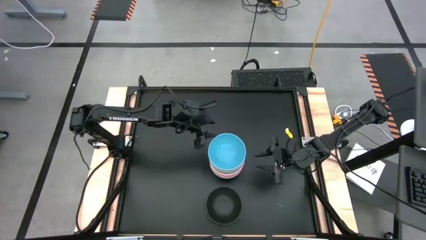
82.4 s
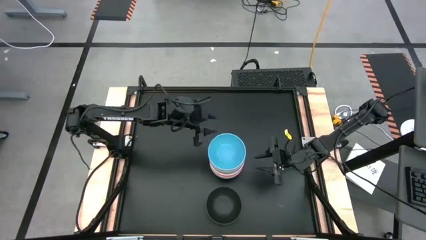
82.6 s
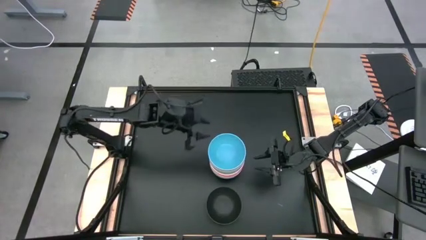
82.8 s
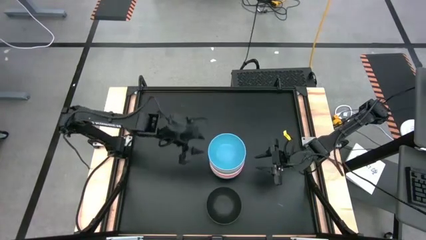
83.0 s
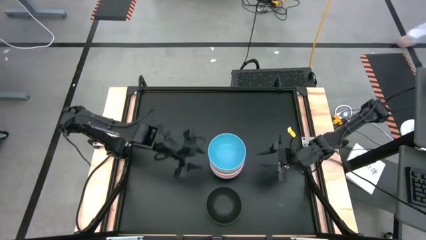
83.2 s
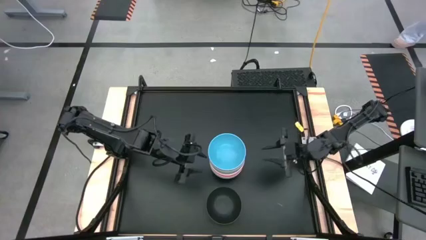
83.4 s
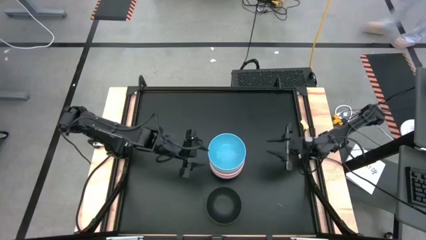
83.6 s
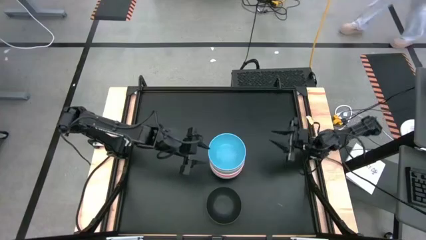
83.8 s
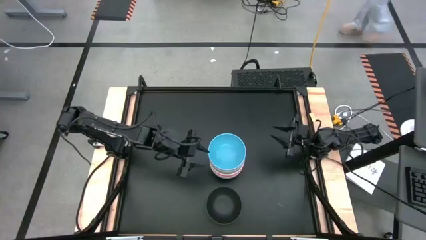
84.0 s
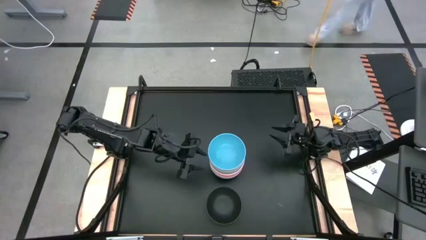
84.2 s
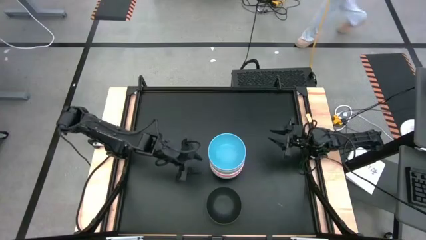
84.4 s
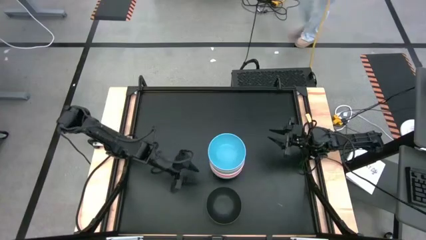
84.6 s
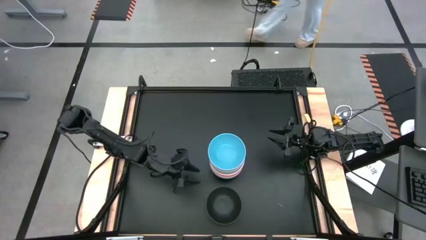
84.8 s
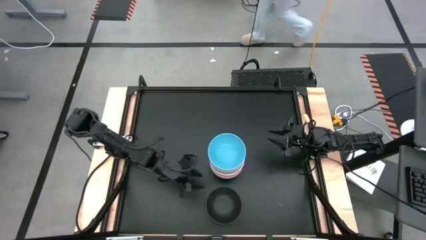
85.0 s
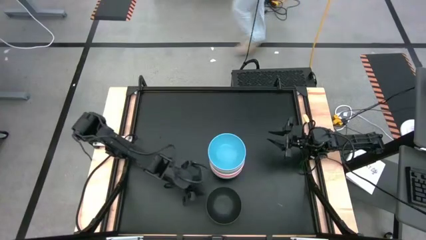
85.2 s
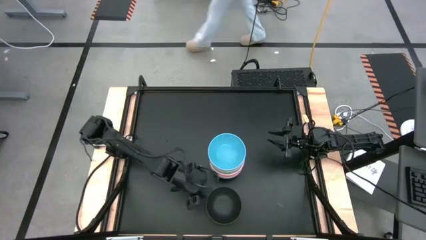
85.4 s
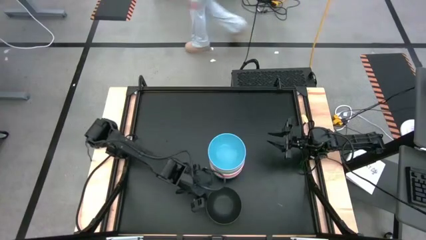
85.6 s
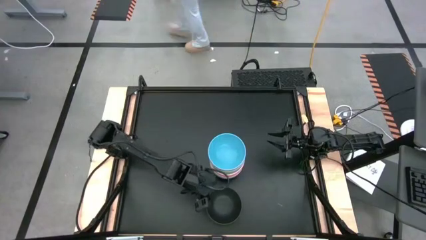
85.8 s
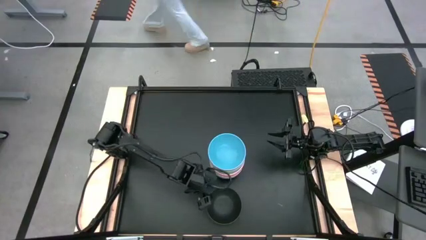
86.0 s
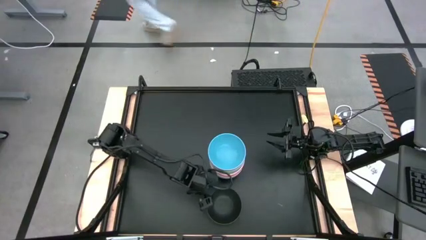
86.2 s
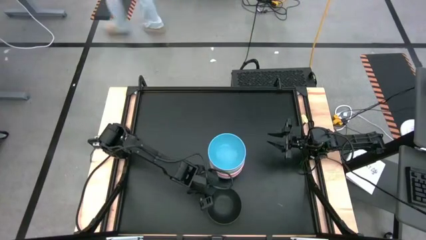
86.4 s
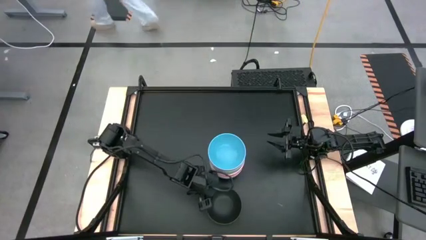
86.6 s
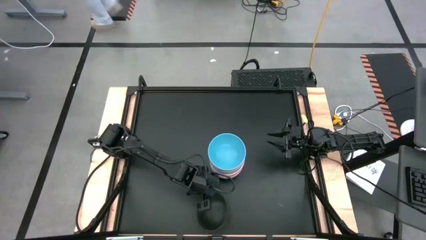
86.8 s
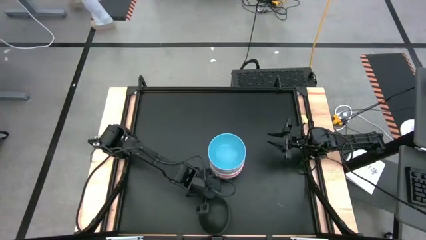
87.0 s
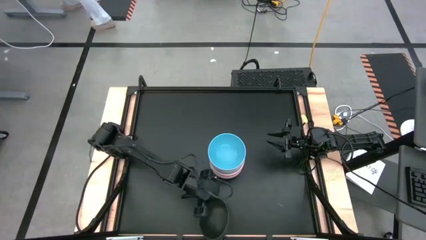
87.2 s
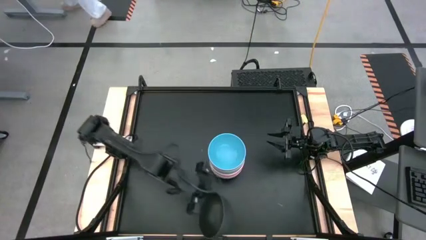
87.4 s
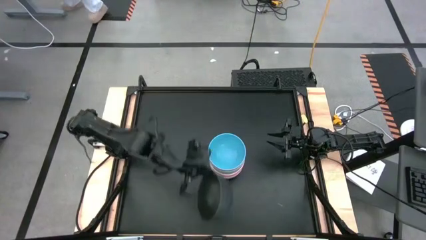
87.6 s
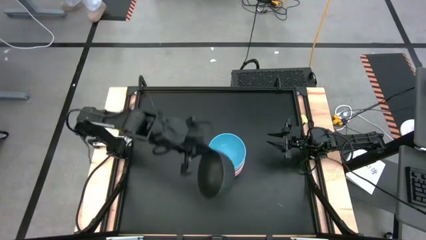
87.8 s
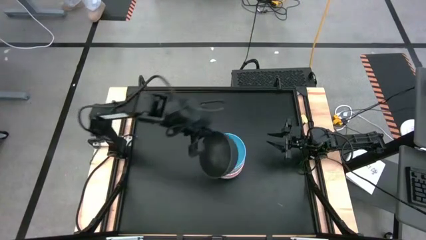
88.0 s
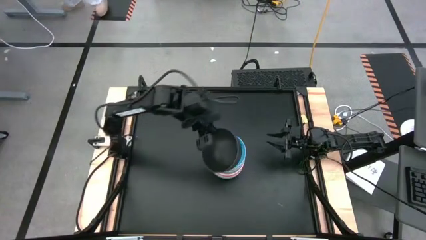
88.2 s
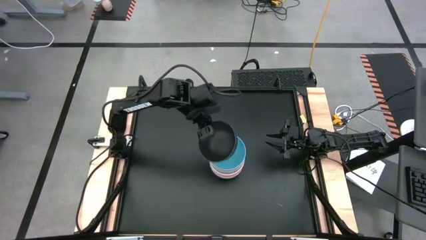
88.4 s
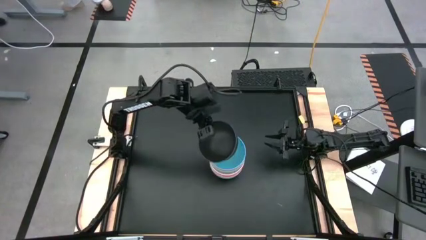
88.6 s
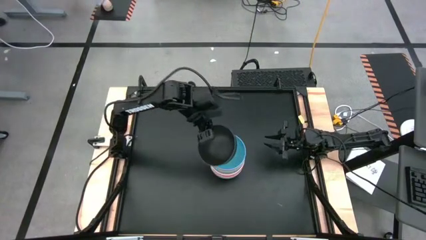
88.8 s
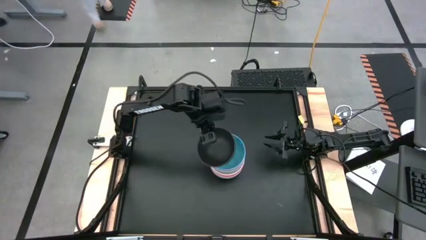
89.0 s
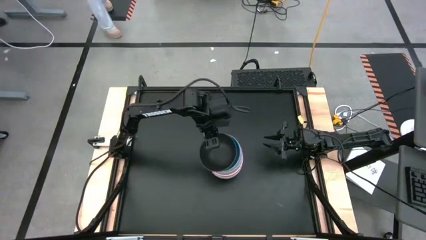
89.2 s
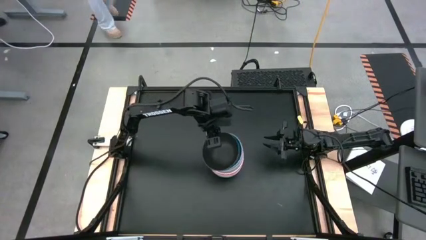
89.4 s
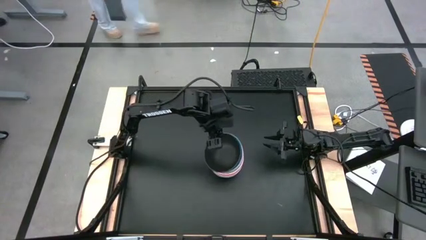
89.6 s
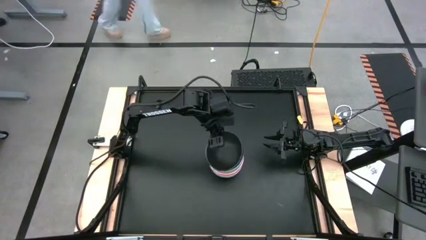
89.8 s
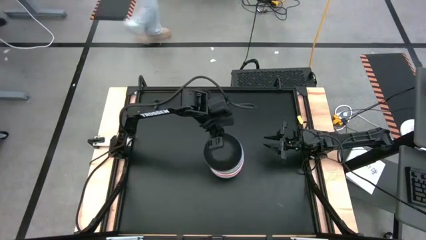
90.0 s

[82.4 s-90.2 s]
Task: Nest bowls inside each other
Stack the black bowl on top of the blue bowl

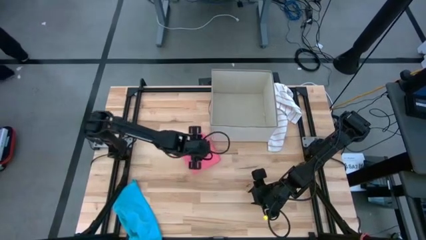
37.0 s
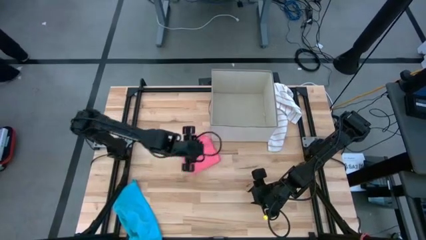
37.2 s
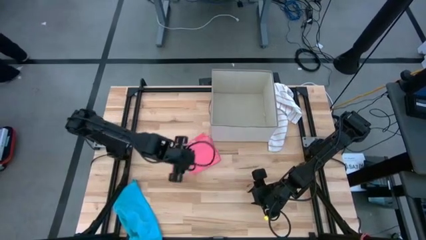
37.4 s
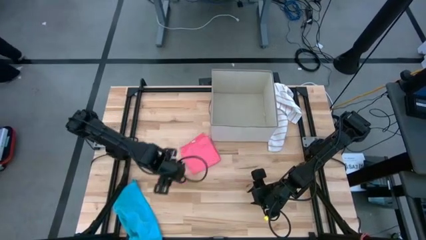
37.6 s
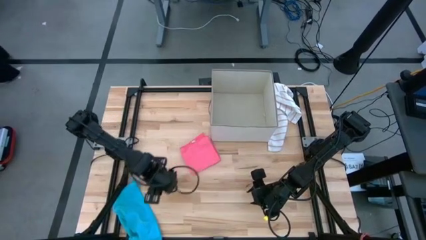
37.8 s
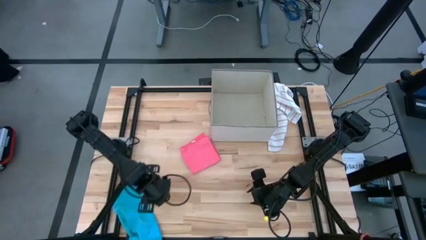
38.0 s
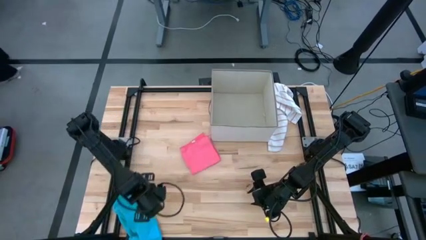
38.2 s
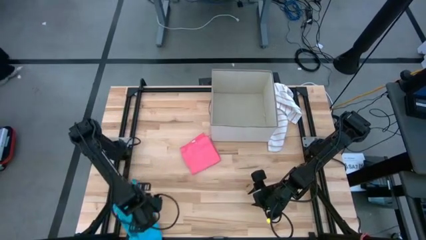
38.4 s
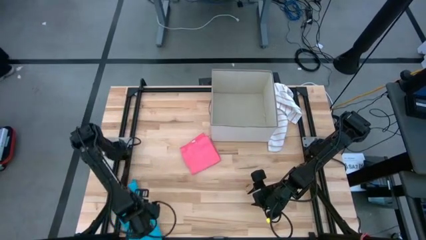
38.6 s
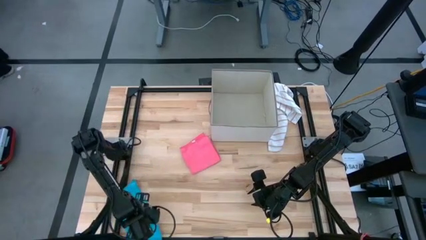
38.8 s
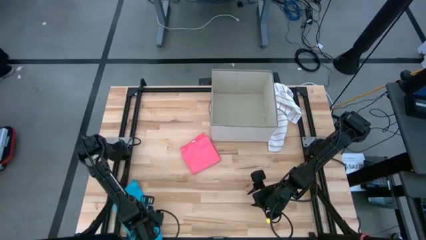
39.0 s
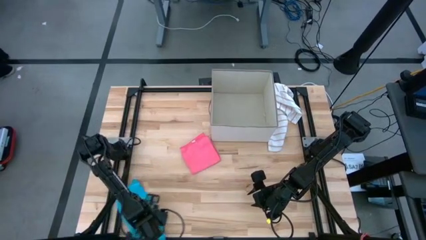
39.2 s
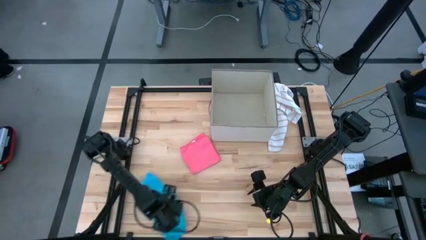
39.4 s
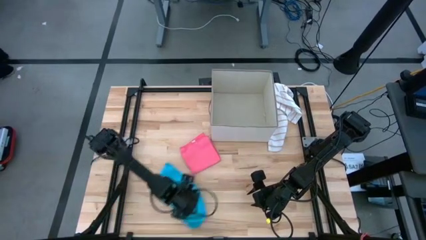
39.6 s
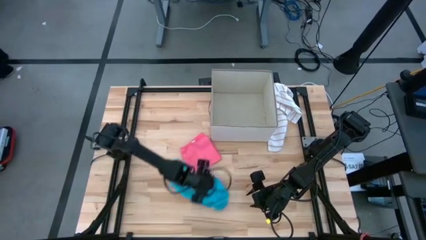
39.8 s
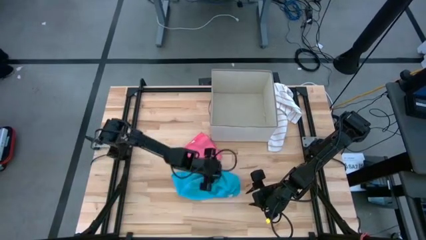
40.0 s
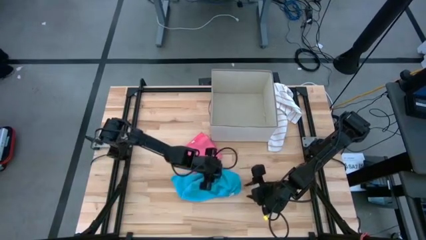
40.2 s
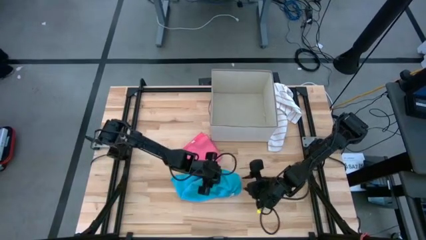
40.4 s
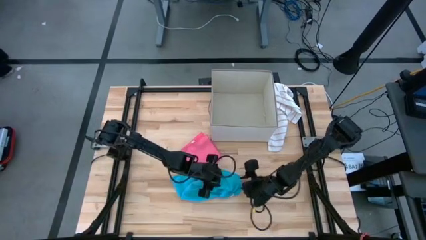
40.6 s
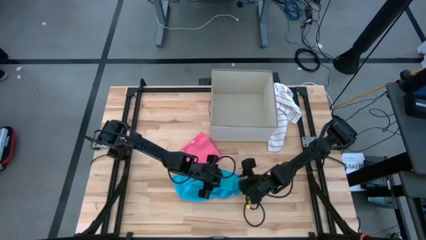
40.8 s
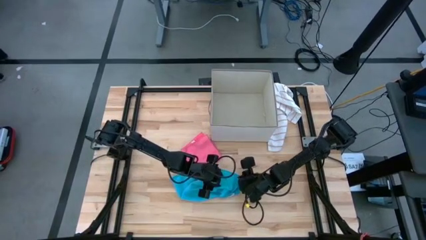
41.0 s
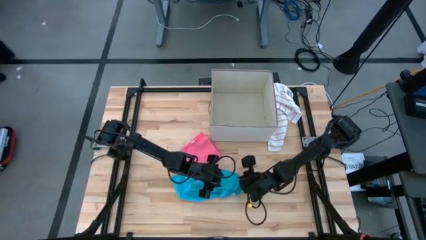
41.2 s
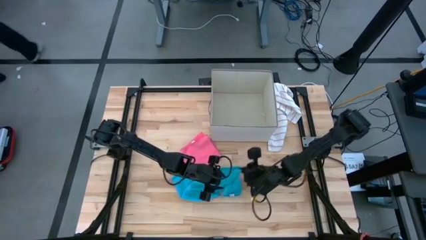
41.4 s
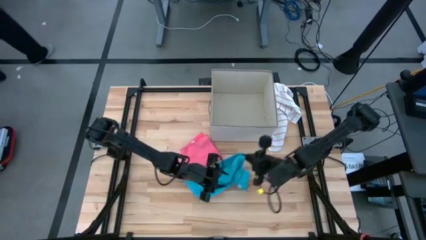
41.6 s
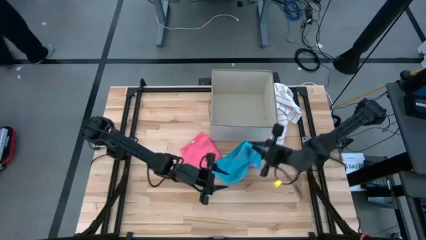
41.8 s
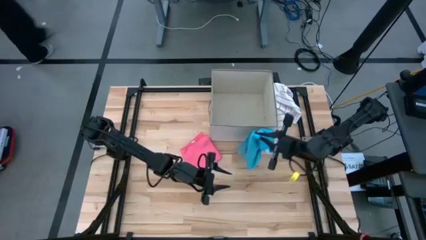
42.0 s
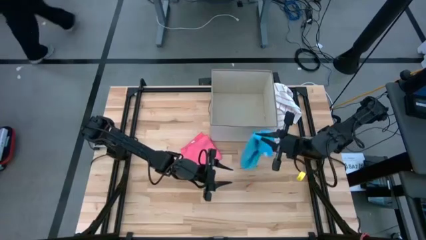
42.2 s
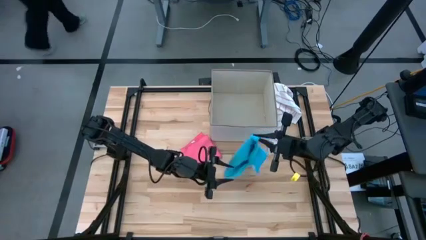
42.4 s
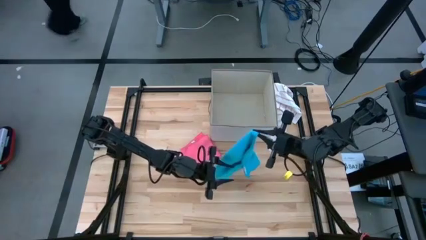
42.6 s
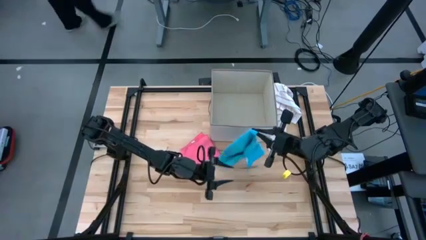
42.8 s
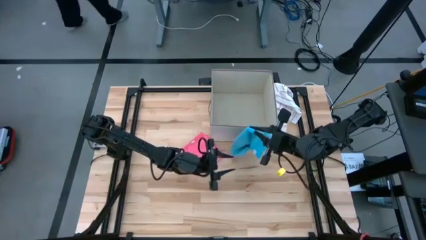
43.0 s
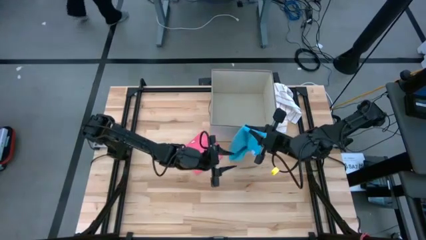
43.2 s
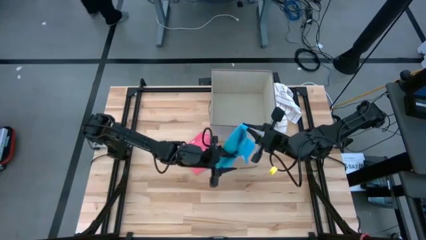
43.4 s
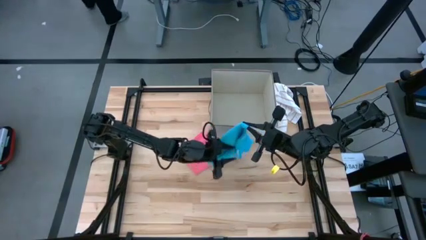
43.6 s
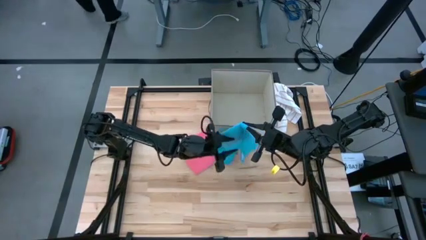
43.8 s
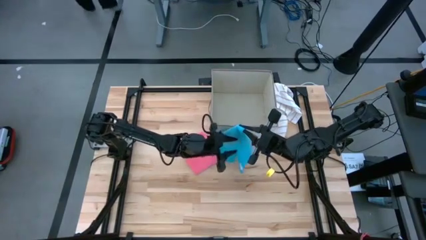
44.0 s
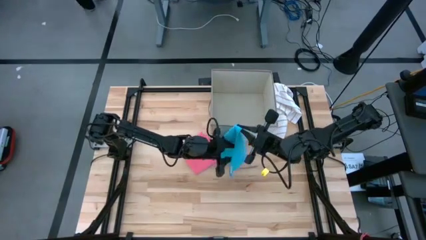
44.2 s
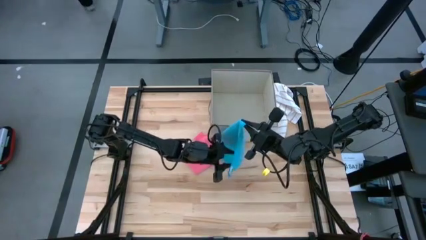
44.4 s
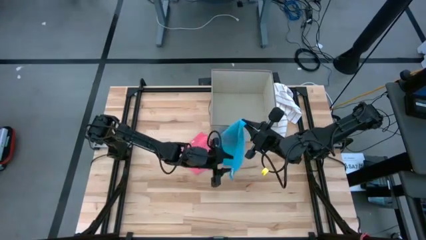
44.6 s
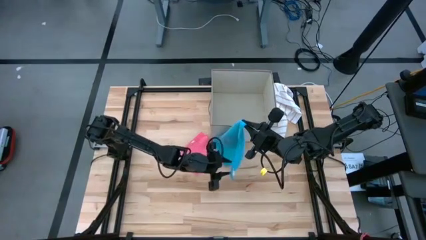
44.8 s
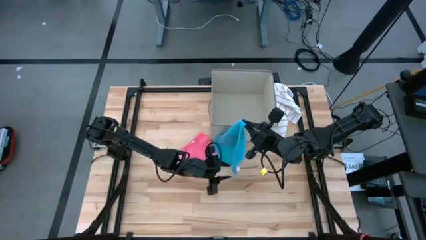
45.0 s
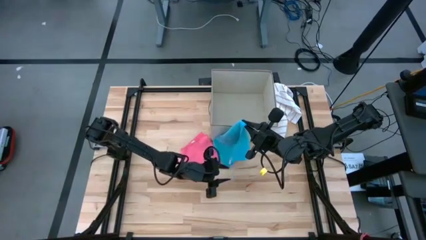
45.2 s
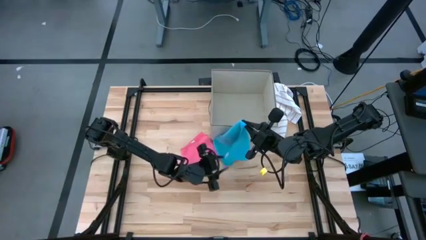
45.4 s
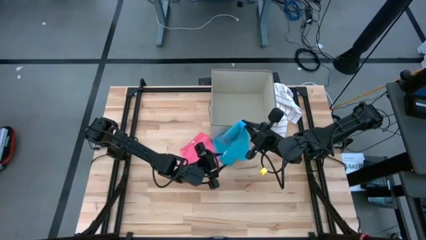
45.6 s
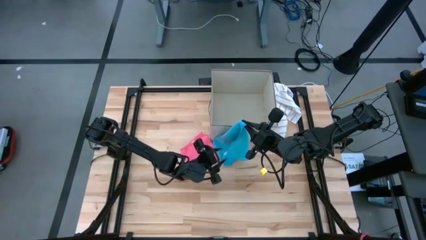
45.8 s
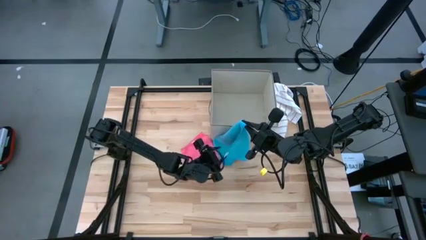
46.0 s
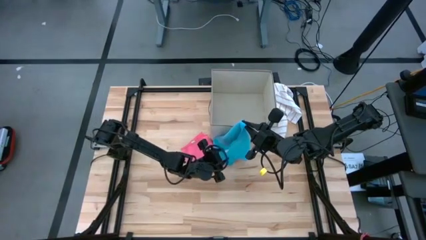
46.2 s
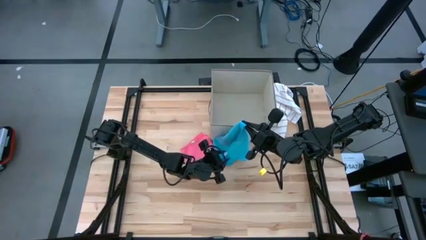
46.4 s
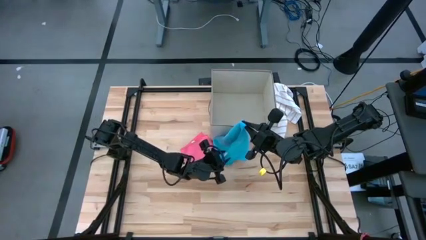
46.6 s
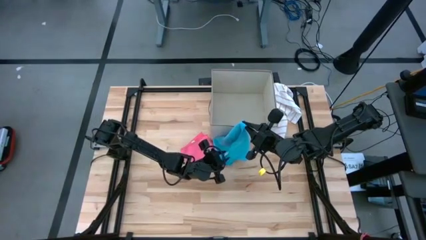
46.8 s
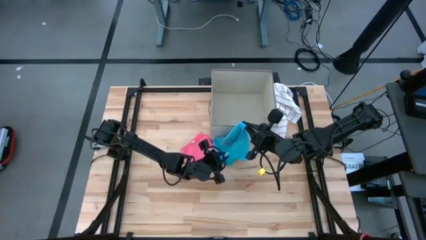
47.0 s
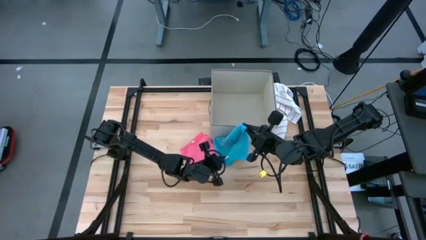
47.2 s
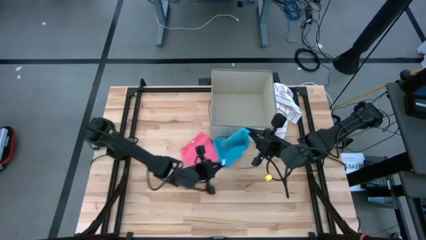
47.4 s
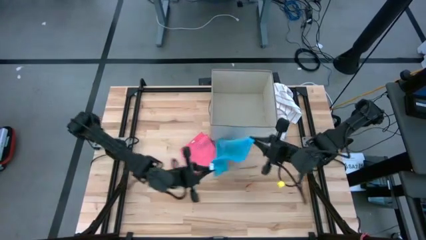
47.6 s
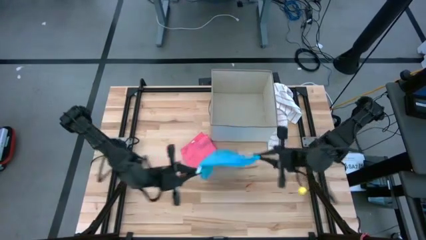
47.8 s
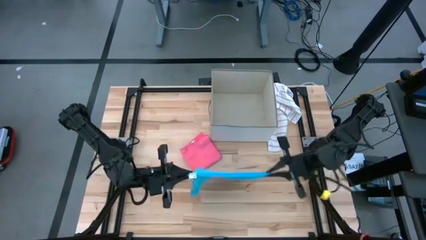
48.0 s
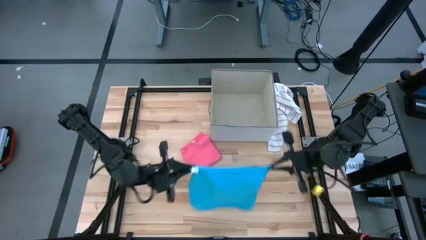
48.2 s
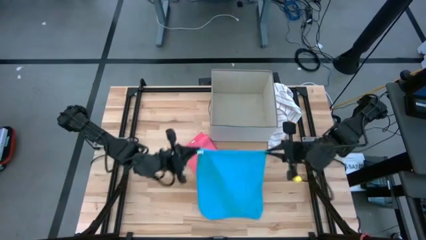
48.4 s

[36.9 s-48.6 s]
Task: Fold towel
Fold the blue microfiber towel
